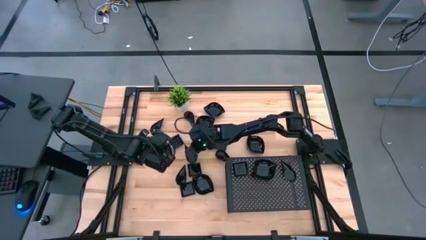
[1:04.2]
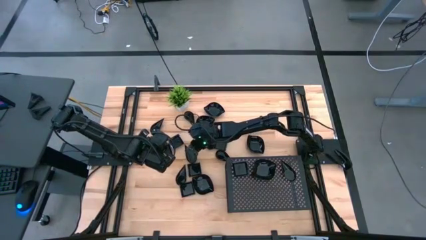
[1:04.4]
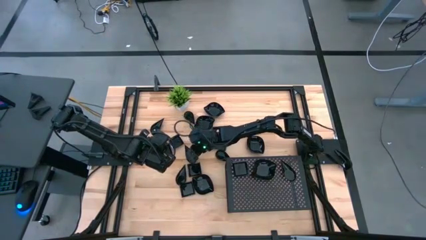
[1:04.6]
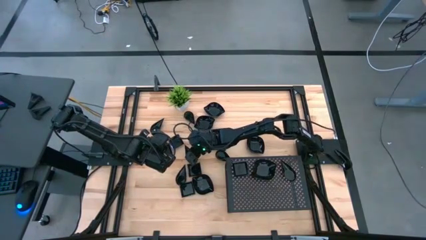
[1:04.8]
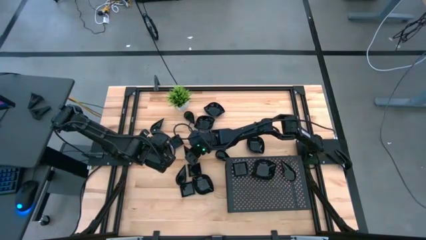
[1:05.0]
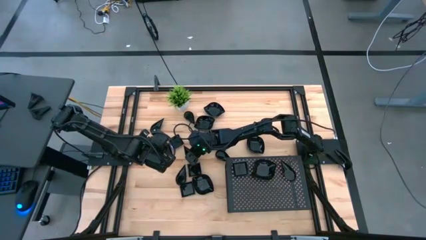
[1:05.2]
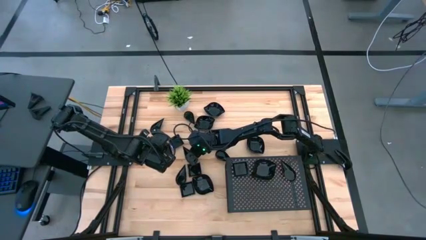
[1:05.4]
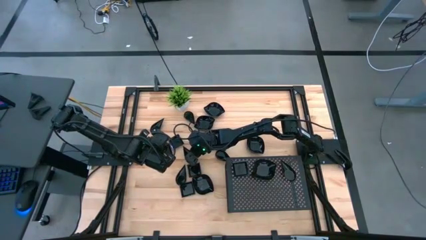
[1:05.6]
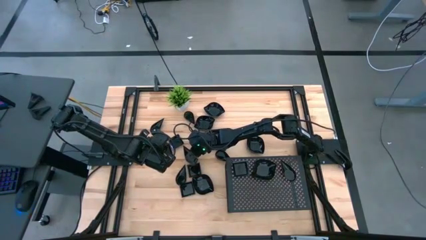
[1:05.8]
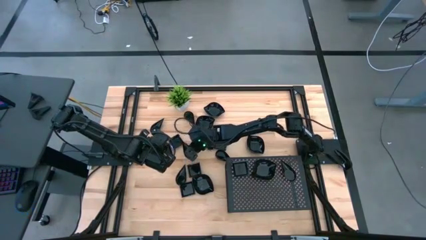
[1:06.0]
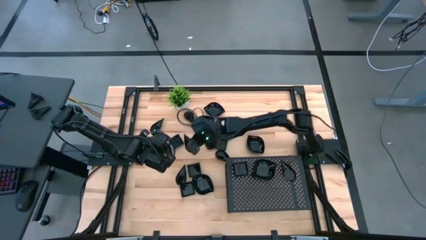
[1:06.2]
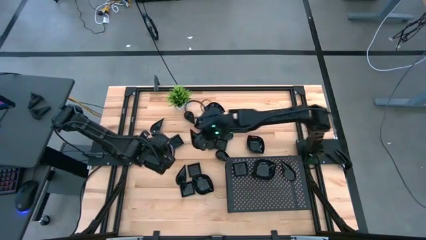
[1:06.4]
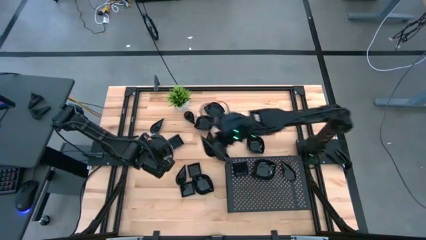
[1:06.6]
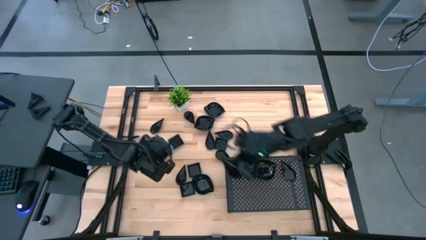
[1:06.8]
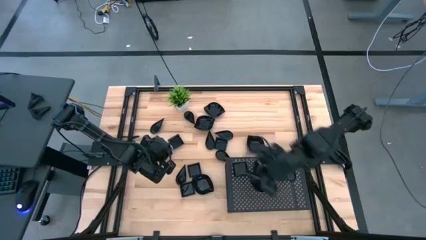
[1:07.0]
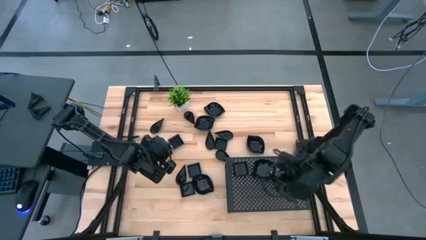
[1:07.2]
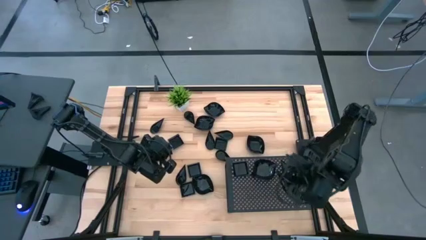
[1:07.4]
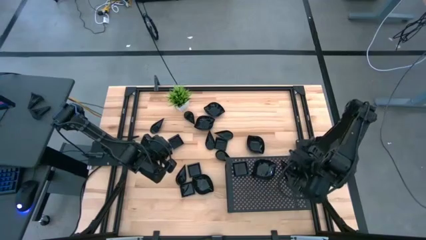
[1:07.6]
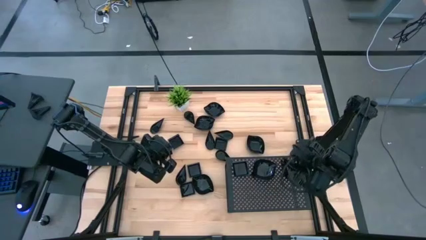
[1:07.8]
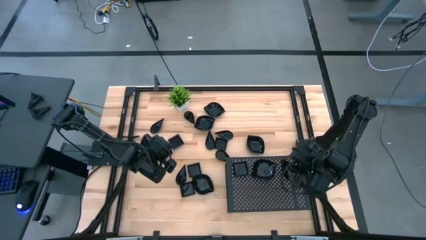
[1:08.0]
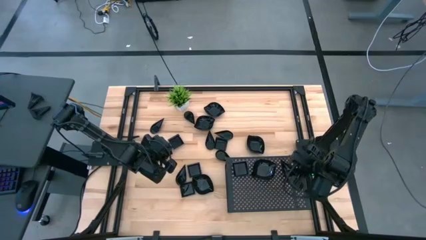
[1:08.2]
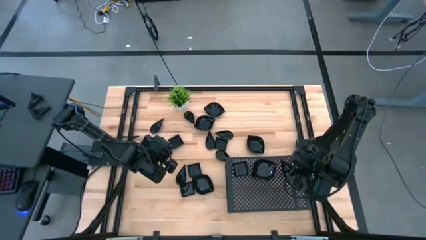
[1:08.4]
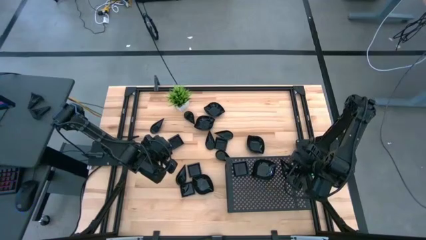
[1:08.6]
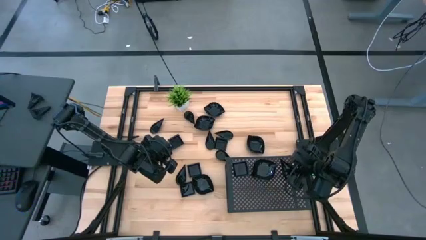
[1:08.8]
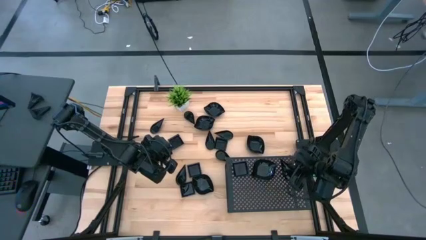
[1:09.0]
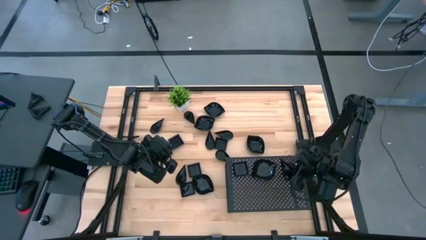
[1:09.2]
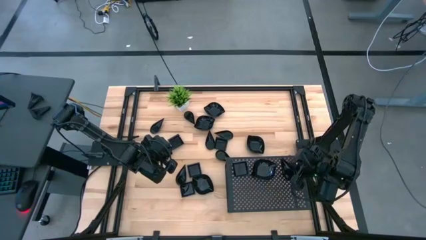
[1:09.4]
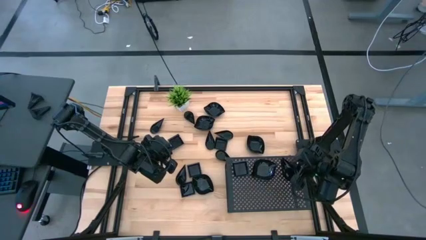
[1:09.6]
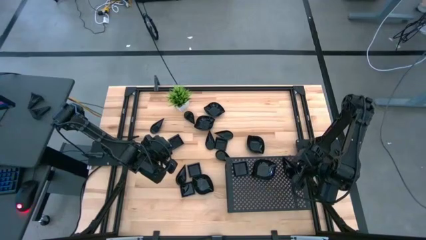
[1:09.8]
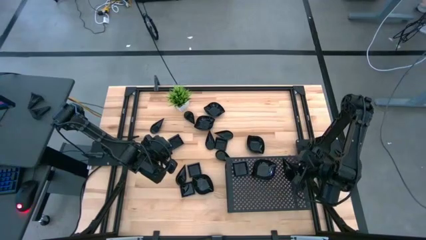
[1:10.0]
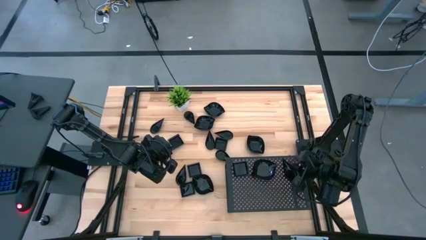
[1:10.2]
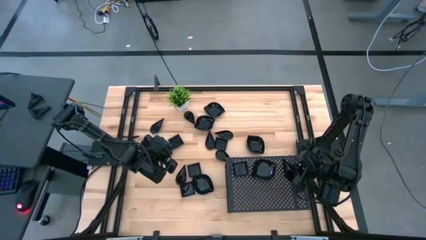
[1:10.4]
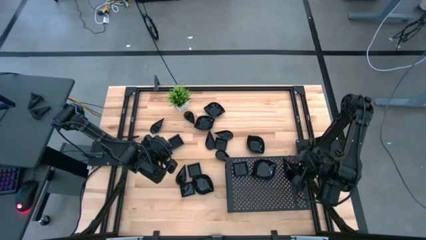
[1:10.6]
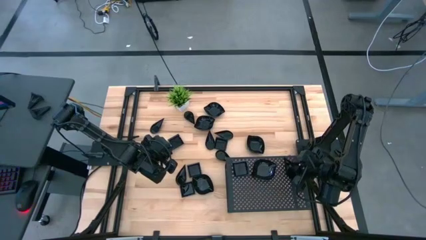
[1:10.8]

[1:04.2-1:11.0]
Task: Pick & Place Mini shaped plates
Stack the drop shaped plate on top of the drop shaped plate on the shelf

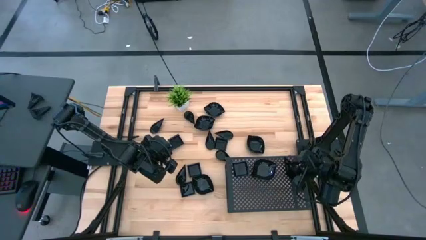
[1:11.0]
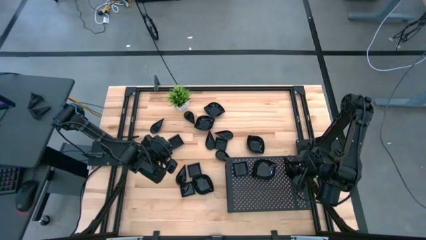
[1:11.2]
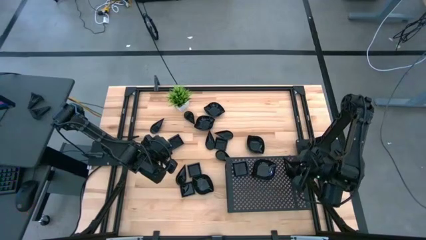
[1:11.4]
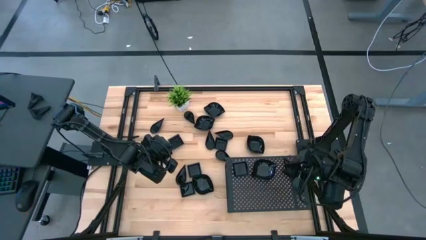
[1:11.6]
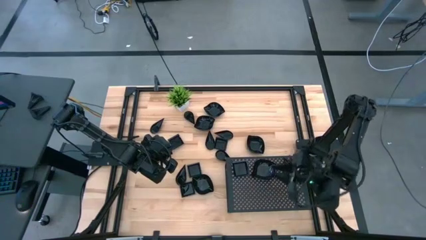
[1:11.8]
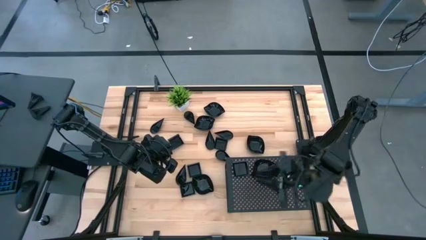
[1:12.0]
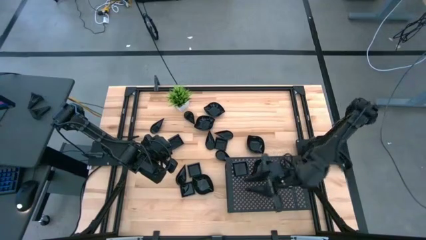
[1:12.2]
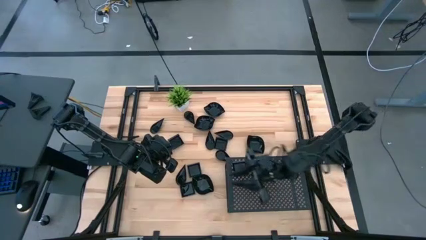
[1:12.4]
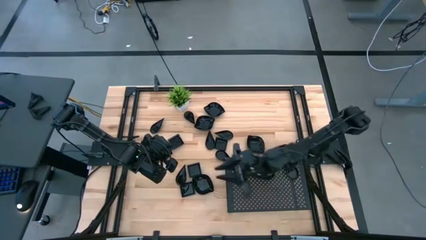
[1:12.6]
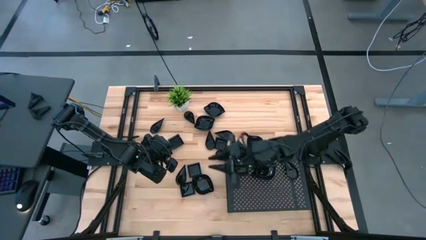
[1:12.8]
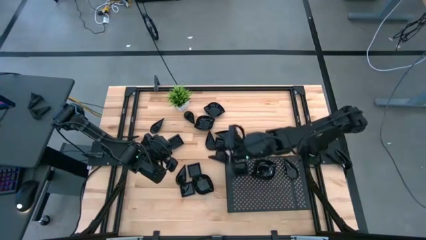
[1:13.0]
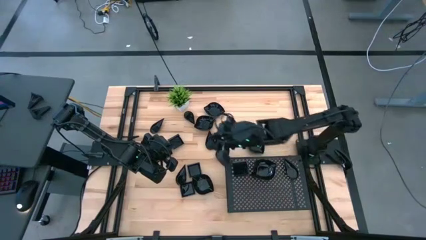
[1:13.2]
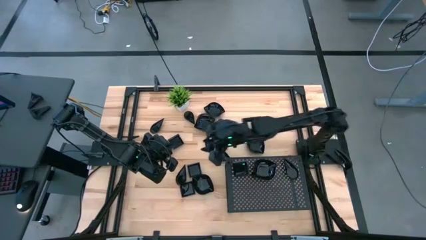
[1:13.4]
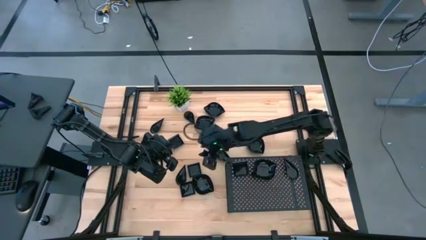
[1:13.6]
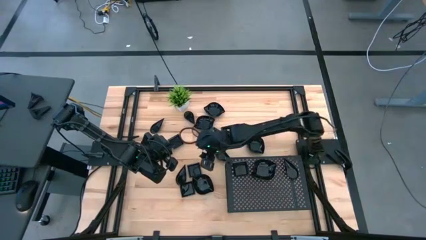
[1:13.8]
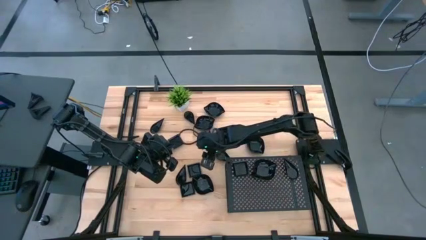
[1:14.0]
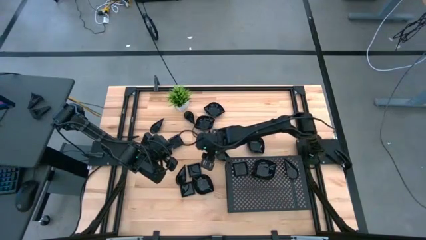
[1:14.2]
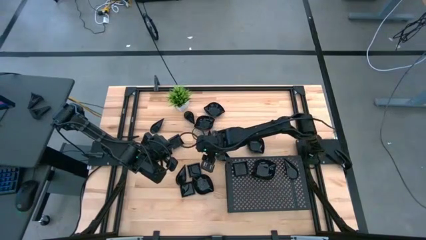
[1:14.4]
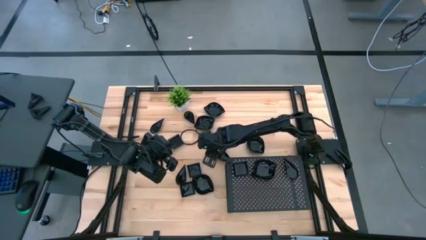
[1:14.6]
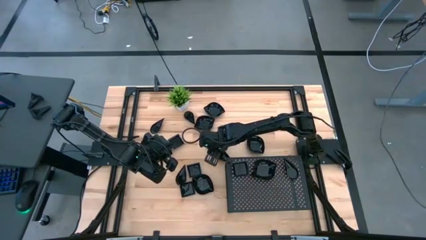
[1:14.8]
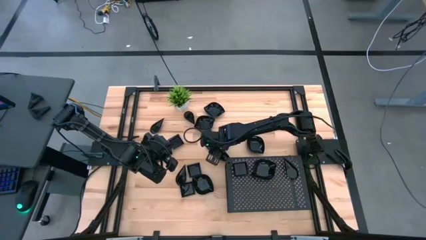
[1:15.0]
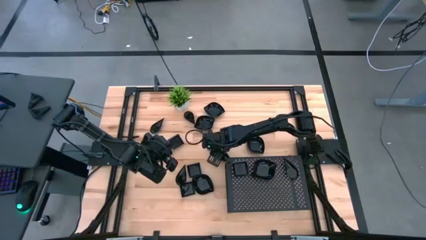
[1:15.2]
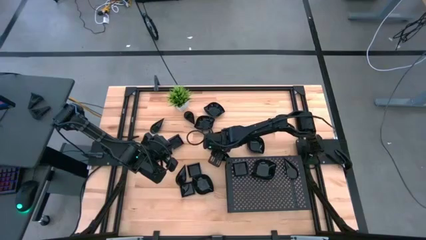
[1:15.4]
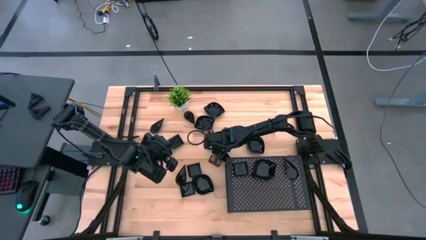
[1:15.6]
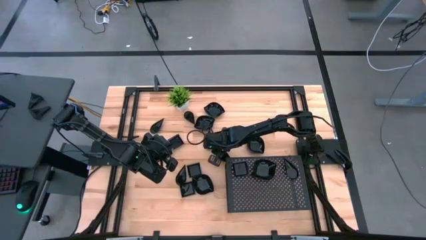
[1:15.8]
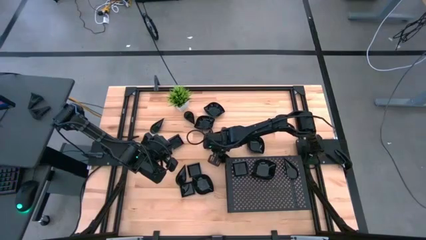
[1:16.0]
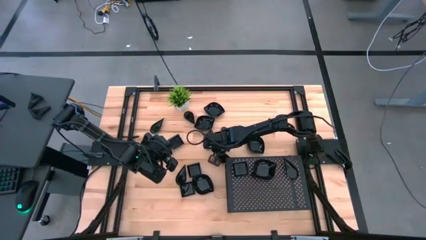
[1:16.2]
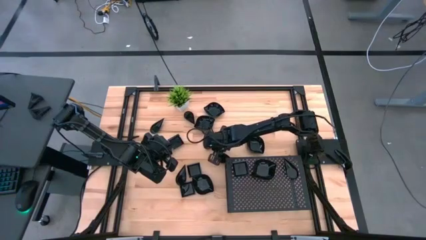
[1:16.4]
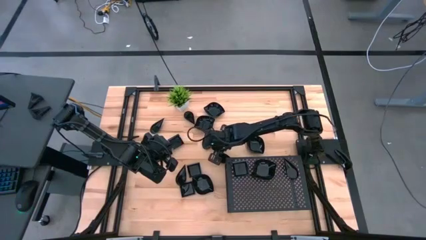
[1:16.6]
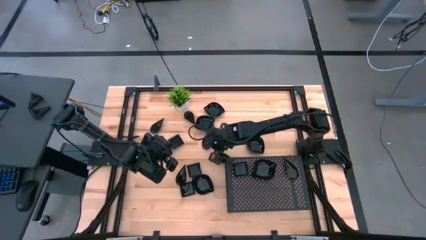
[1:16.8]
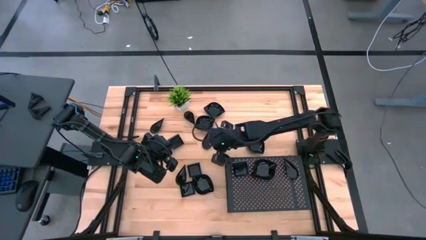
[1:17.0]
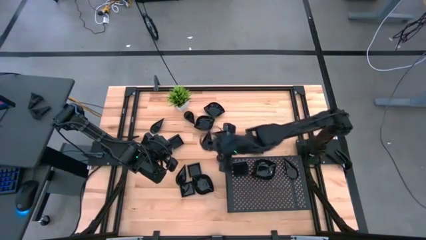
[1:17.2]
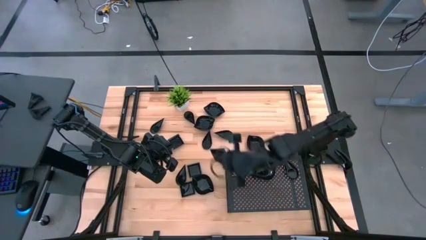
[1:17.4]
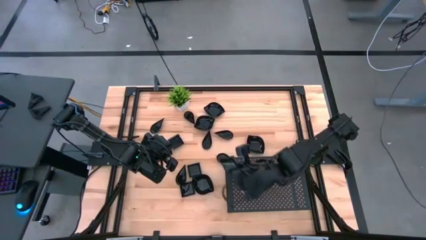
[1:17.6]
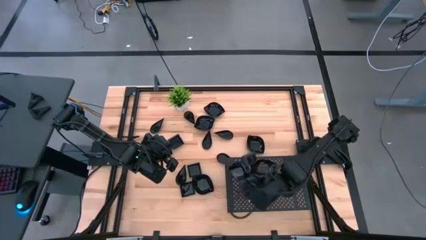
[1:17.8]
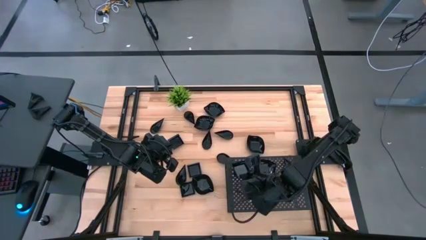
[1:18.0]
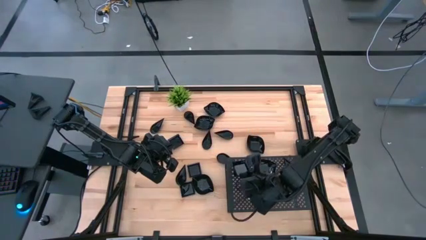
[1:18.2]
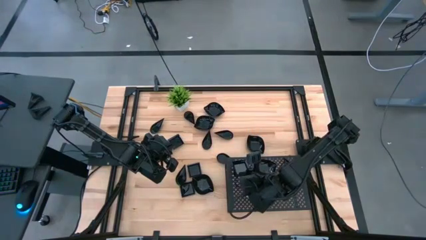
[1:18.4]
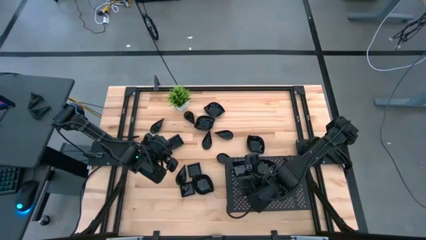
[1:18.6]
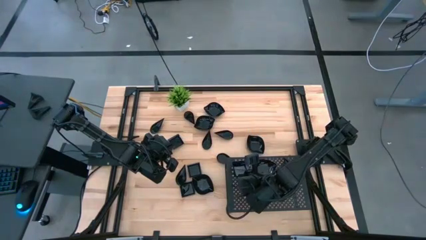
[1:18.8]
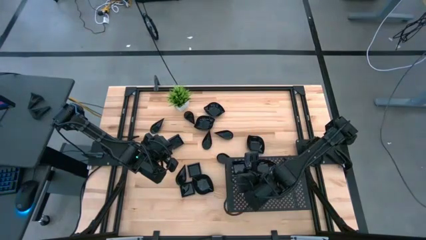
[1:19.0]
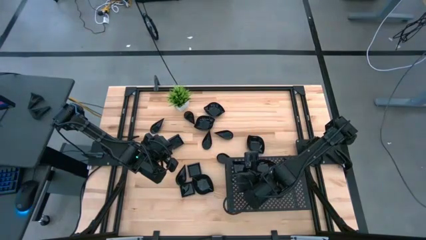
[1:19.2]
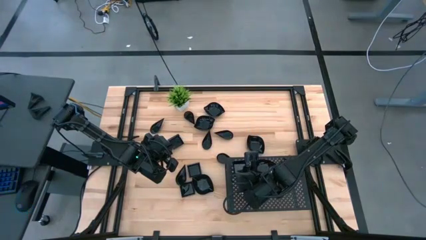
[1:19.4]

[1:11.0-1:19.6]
Stack the square plate on top of the square plate on the shelf
